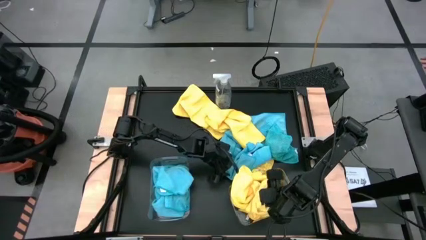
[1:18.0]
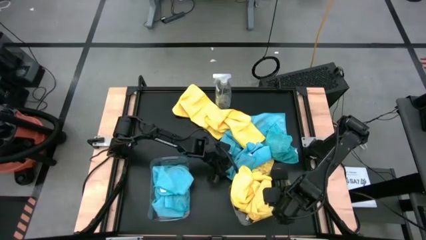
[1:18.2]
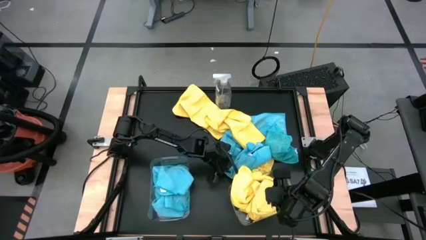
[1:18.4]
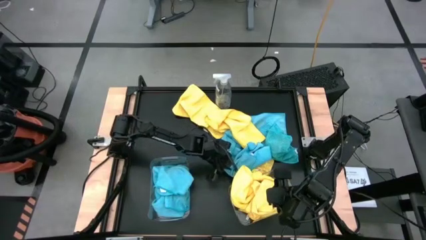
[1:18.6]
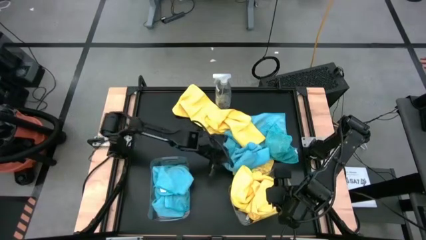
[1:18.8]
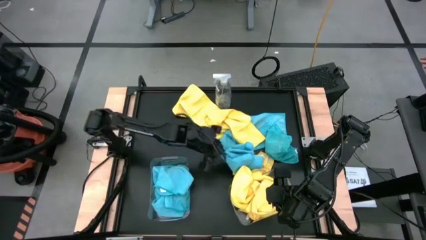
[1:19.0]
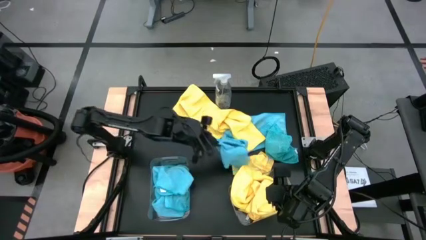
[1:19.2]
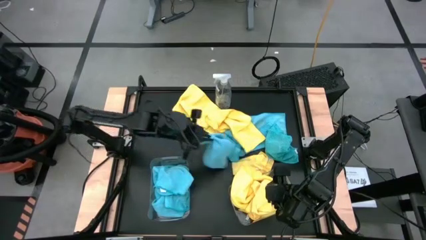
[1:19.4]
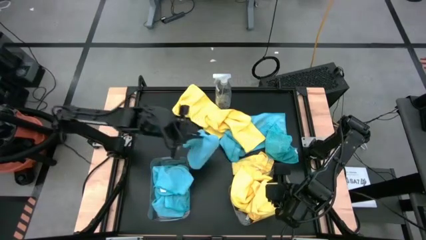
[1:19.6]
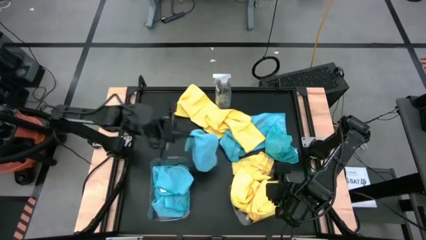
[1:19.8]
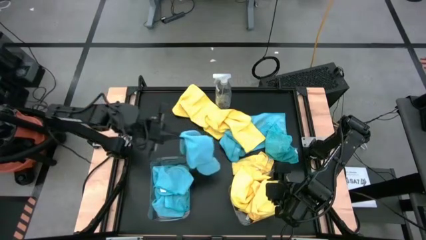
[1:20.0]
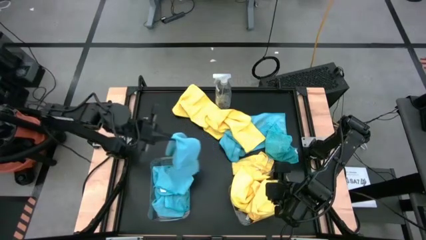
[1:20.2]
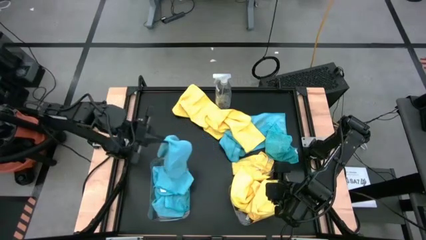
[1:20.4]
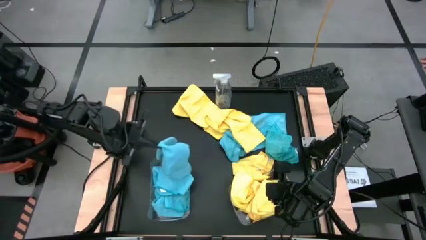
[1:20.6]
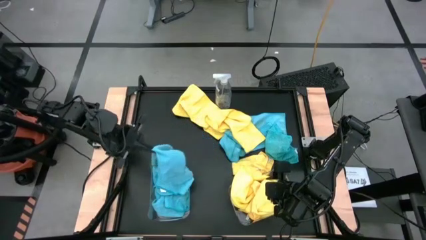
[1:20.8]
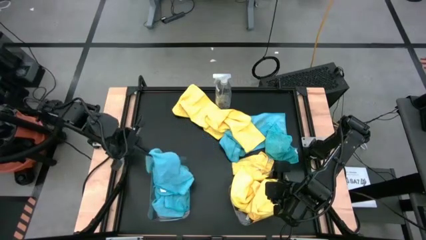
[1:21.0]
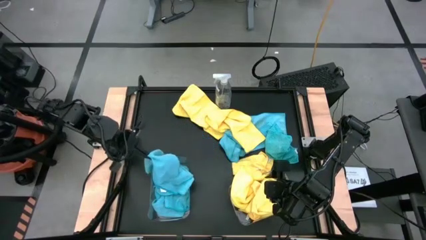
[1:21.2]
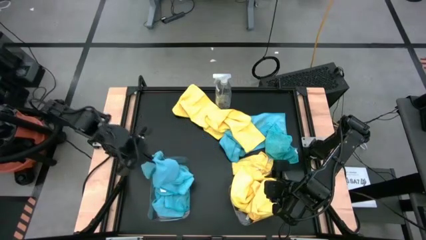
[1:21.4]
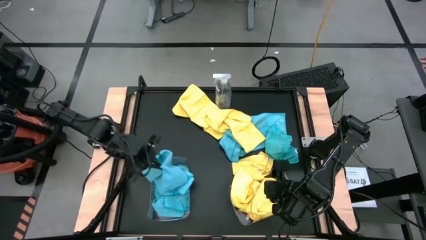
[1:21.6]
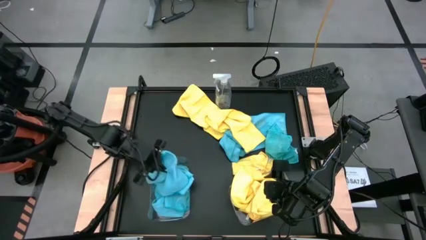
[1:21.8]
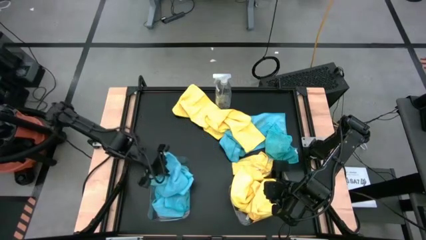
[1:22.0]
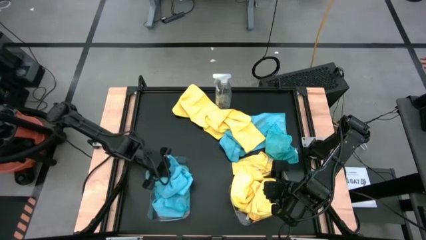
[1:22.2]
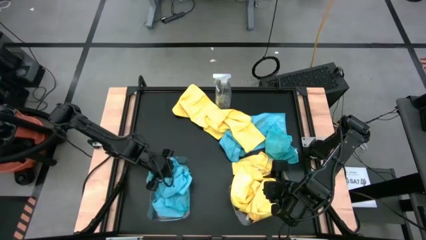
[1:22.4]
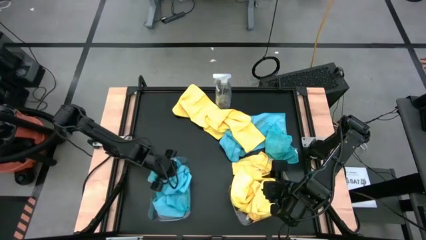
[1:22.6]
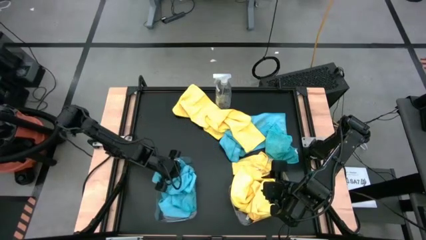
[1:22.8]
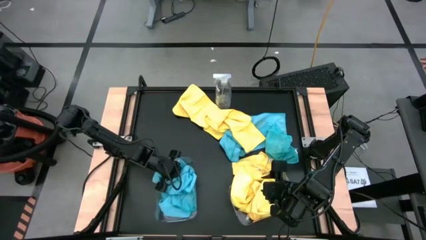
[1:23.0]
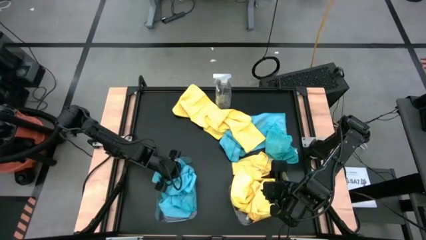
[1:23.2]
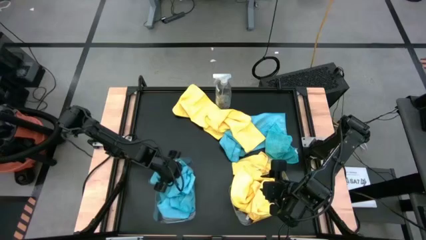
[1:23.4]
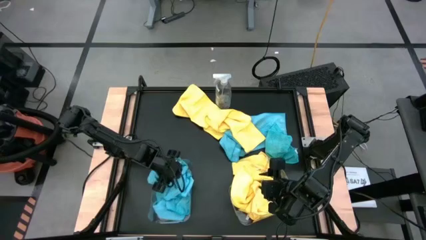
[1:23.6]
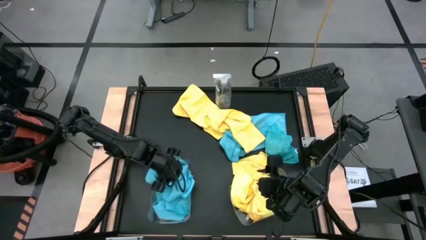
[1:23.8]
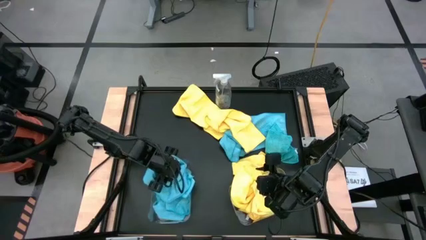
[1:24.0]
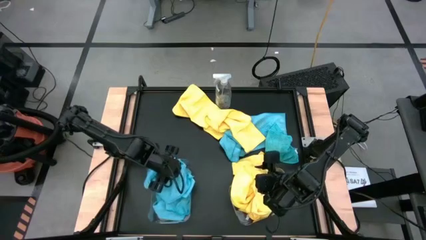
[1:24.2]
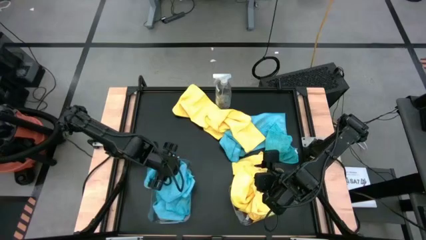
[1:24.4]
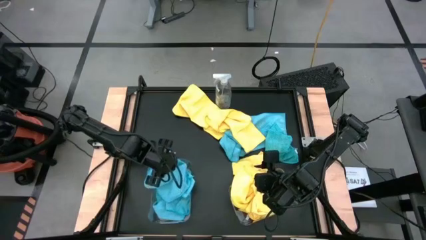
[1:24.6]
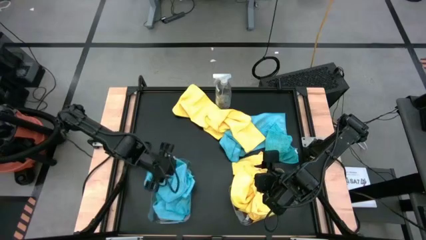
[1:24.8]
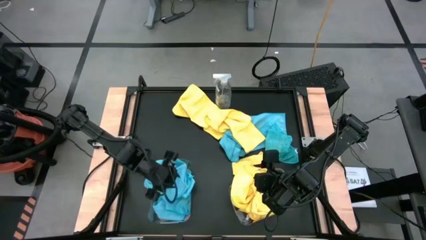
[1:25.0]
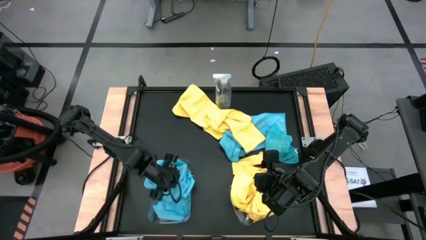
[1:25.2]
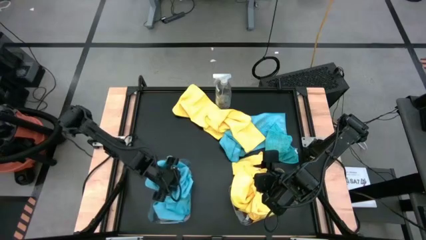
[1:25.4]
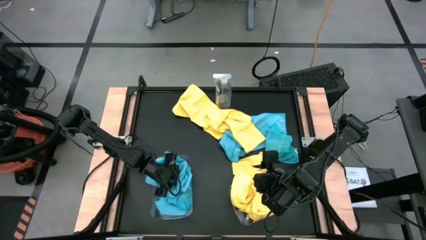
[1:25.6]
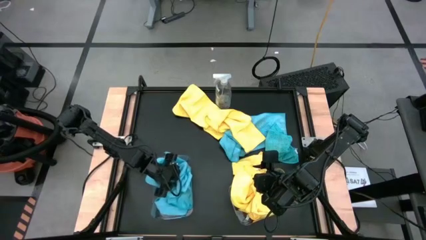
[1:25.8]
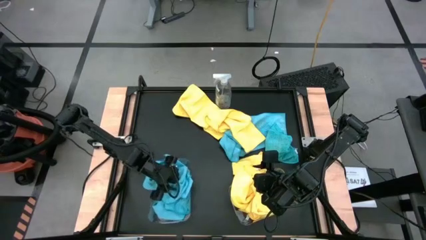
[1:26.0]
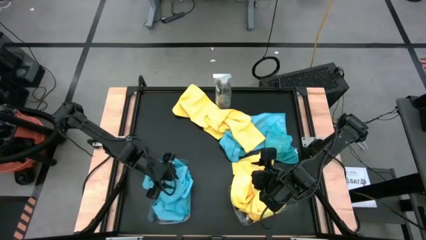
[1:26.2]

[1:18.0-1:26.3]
Task: Sort microfiber towel by color & place in baskets
Put the blue microfiber towel into the left transparent bin

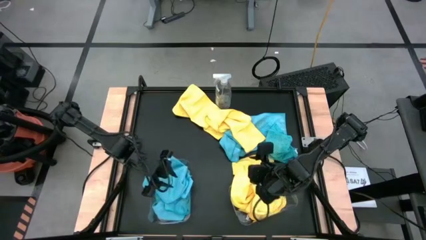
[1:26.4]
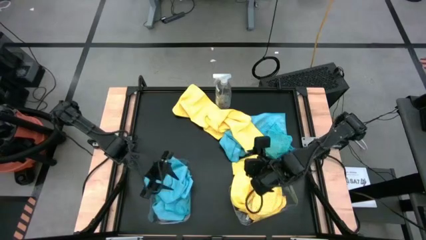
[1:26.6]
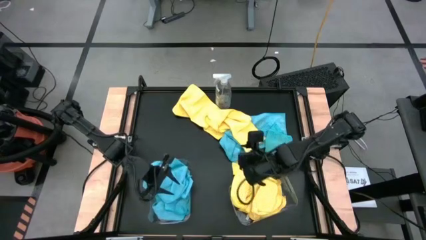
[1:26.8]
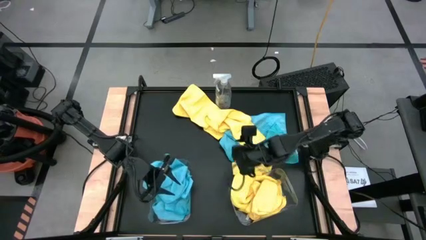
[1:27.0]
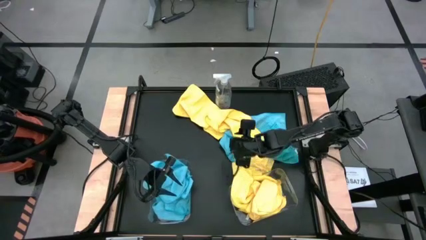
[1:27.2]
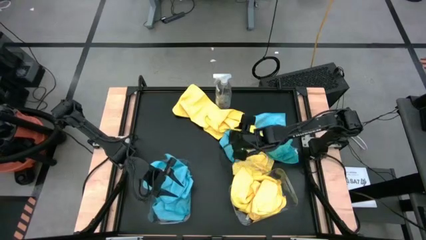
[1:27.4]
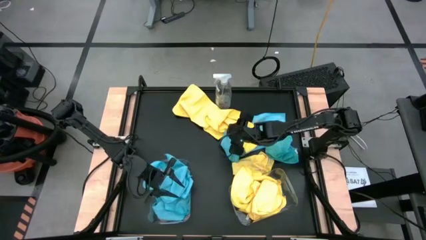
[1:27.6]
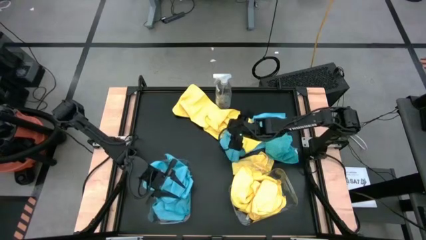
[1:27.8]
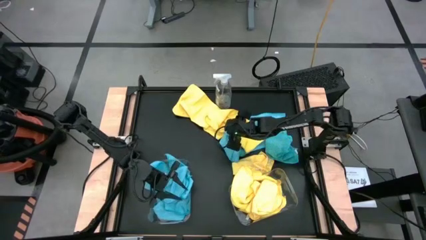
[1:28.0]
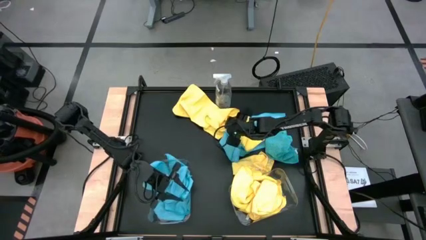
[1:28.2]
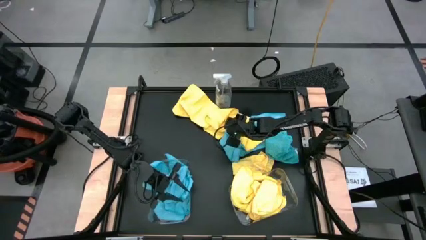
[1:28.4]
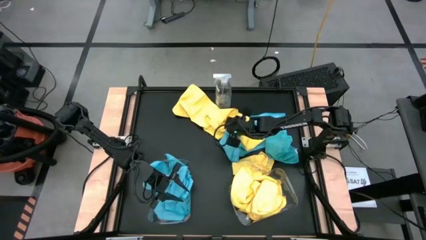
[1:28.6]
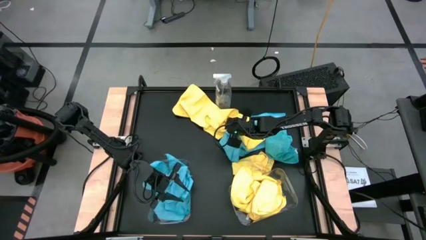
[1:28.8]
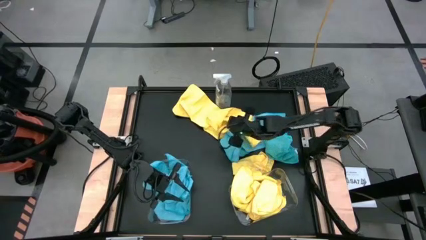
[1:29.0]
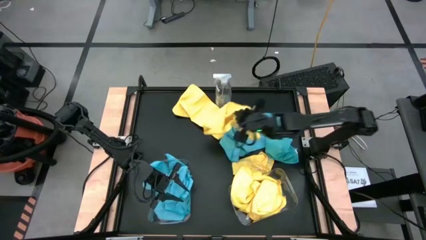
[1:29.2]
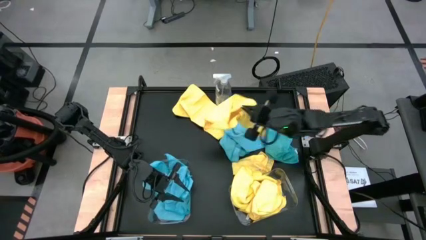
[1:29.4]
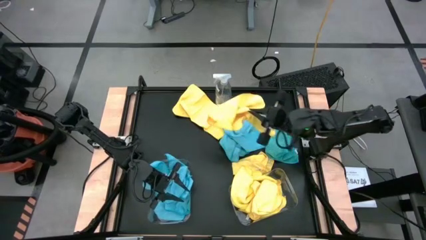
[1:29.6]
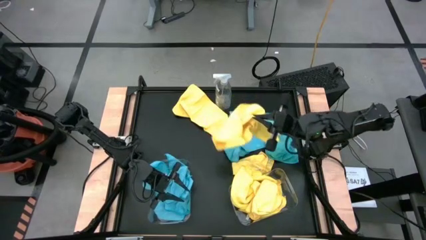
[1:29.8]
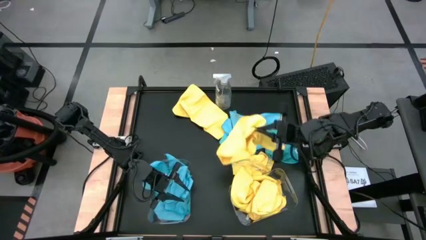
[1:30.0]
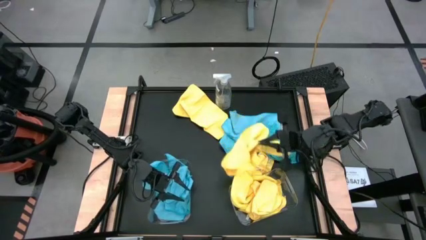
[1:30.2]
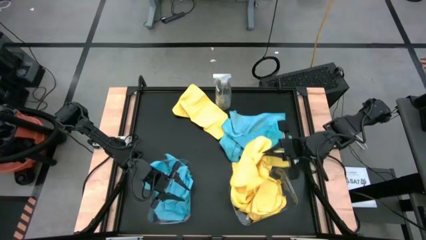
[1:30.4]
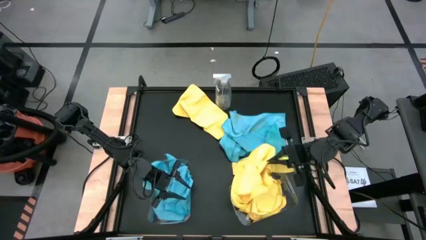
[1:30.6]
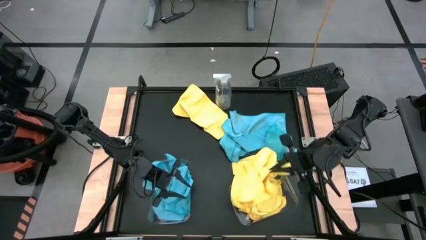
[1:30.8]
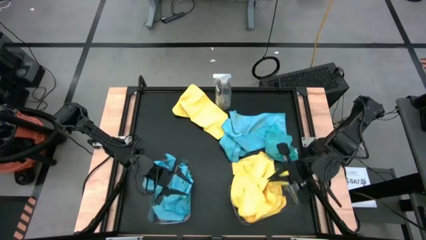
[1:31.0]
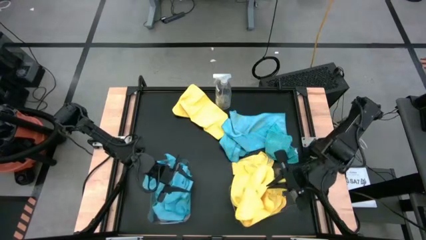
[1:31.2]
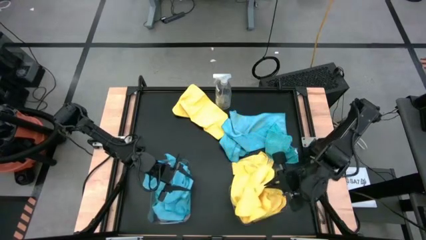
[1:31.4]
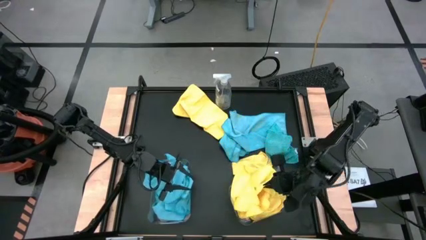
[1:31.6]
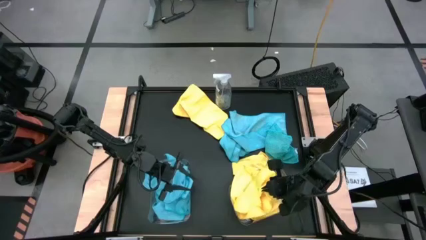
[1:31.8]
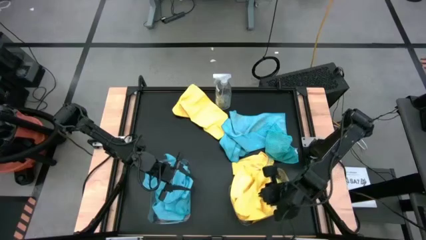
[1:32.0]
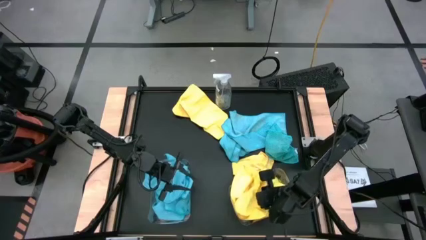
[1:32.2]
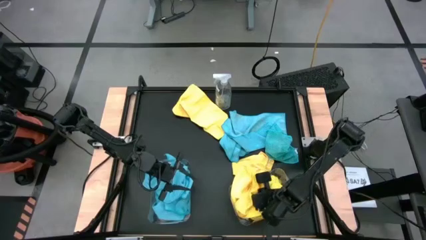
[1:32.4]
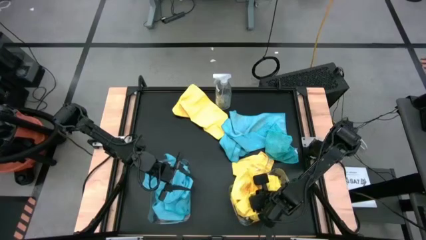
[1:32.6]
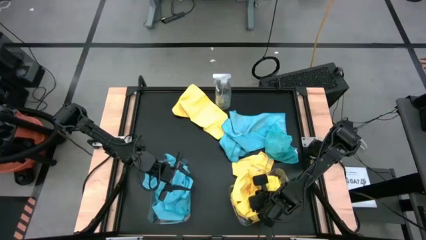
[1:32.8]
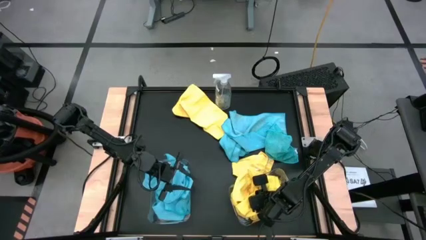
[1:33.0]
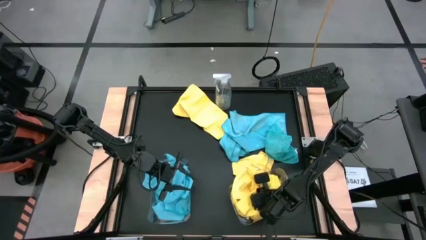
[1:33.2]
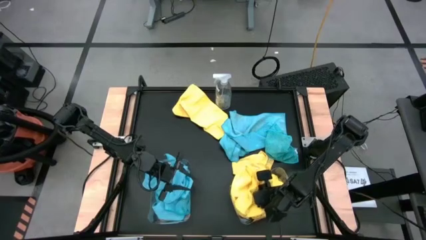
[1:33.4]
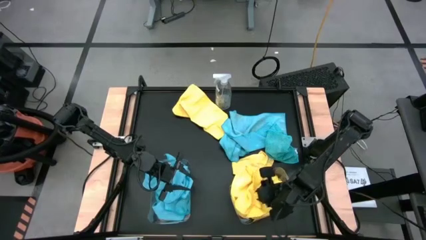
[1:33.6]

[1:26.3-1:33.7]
Put the yellow microfiber towel into the right transparent bin
